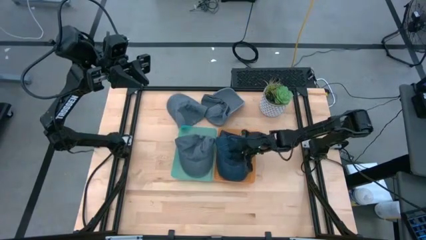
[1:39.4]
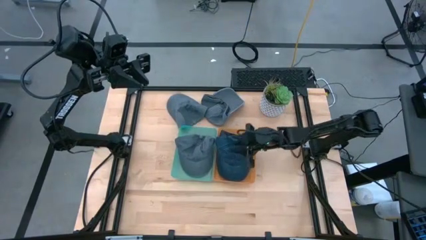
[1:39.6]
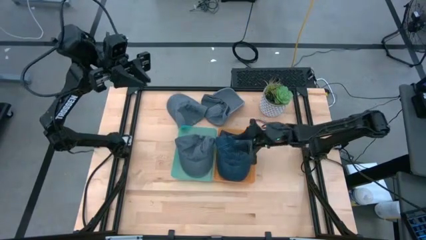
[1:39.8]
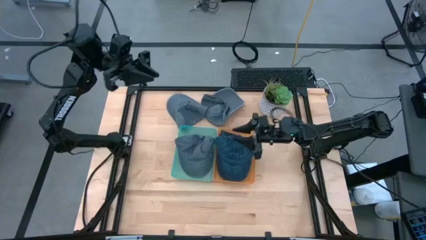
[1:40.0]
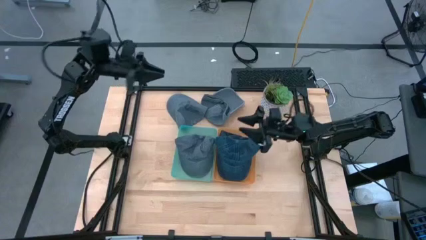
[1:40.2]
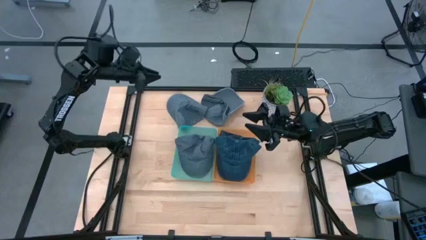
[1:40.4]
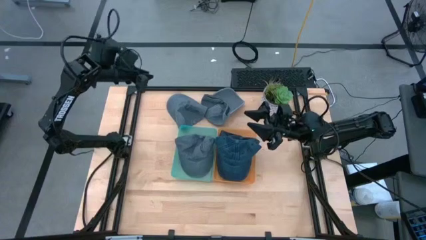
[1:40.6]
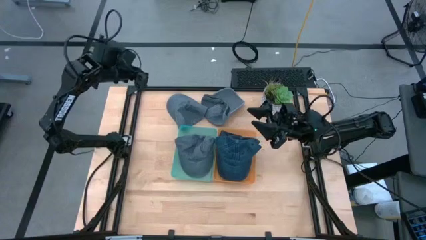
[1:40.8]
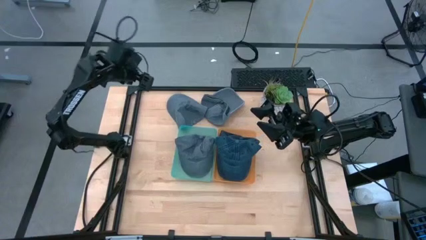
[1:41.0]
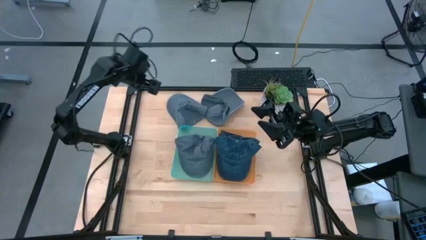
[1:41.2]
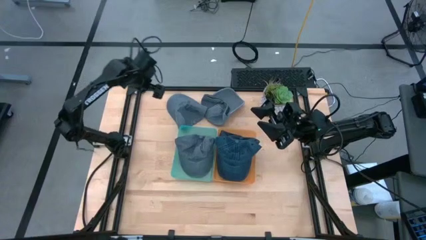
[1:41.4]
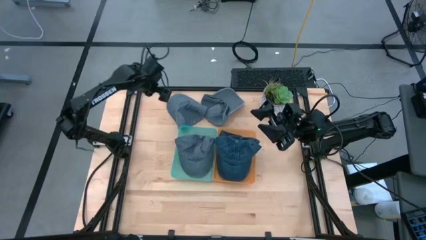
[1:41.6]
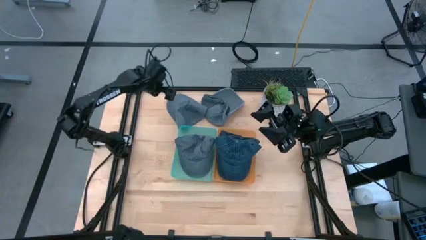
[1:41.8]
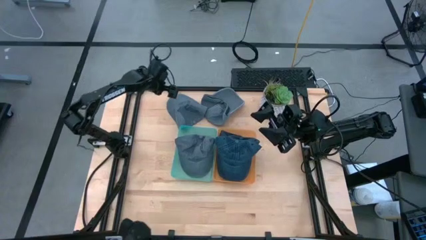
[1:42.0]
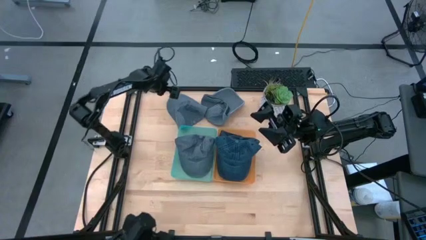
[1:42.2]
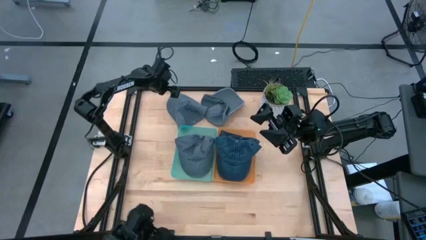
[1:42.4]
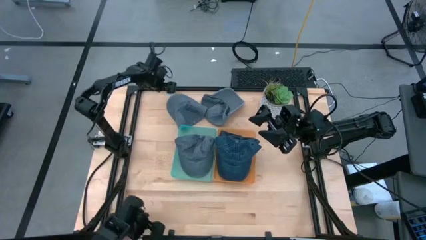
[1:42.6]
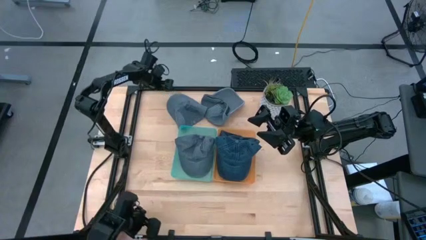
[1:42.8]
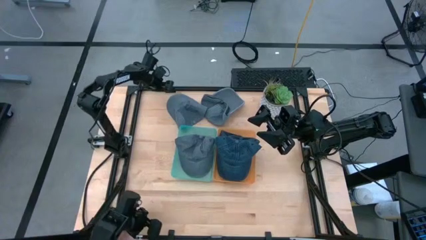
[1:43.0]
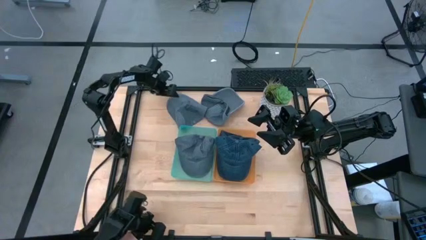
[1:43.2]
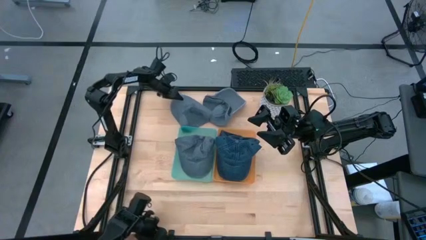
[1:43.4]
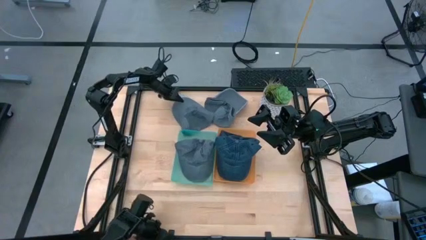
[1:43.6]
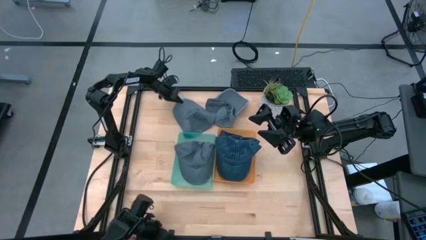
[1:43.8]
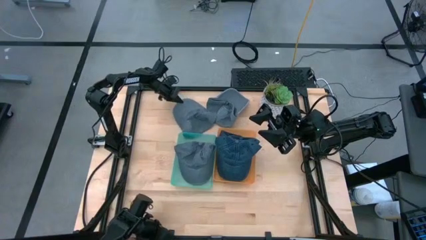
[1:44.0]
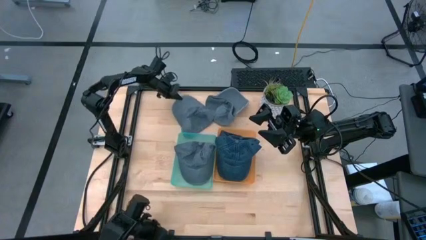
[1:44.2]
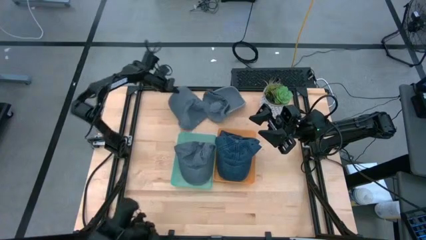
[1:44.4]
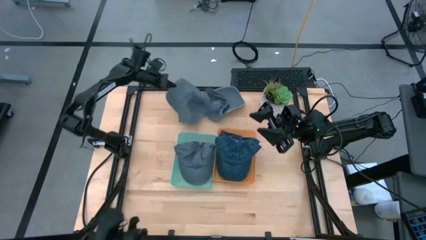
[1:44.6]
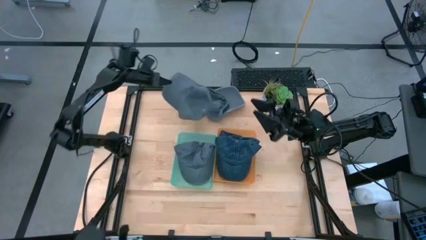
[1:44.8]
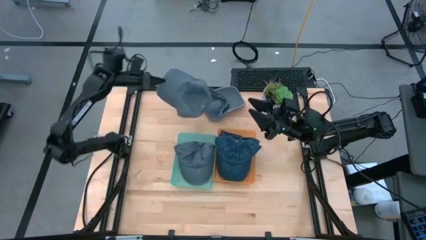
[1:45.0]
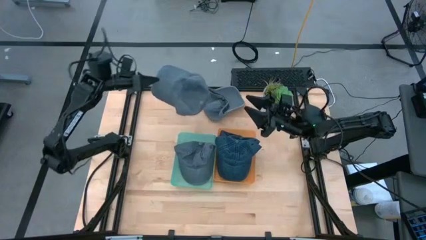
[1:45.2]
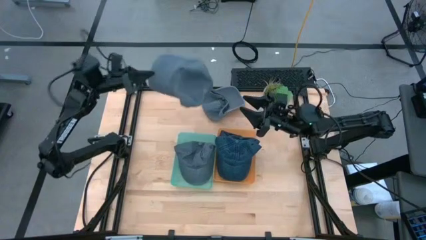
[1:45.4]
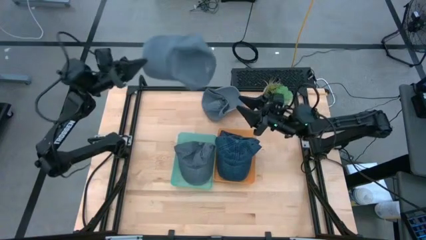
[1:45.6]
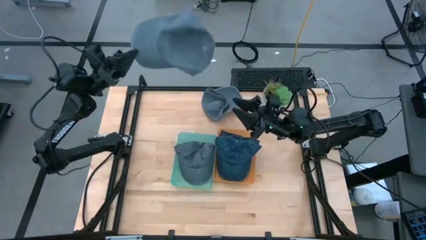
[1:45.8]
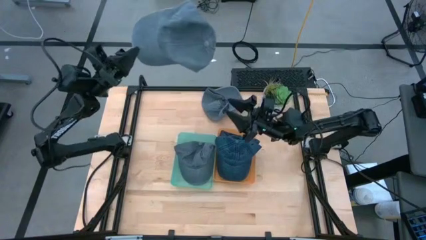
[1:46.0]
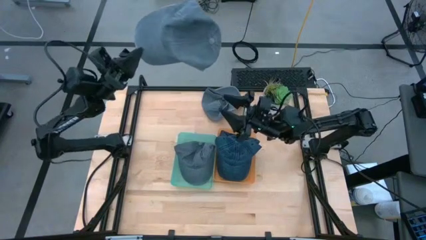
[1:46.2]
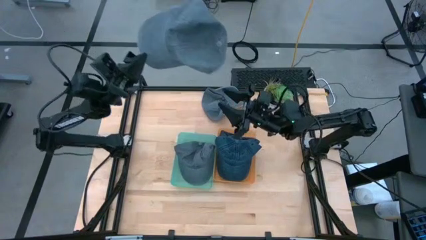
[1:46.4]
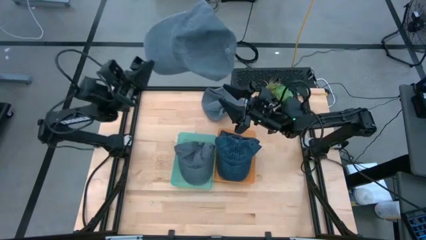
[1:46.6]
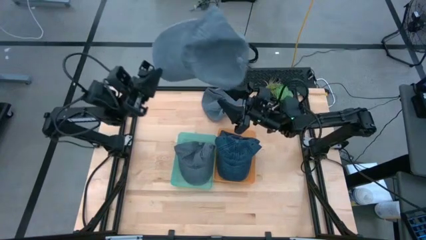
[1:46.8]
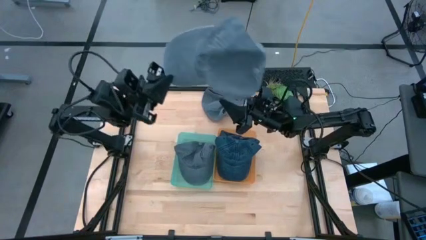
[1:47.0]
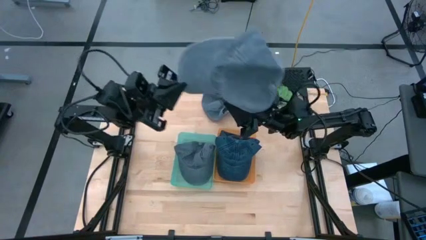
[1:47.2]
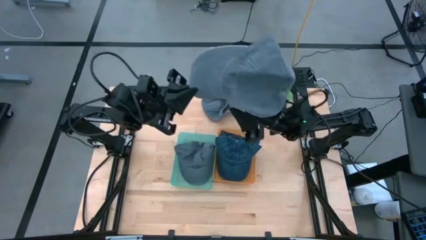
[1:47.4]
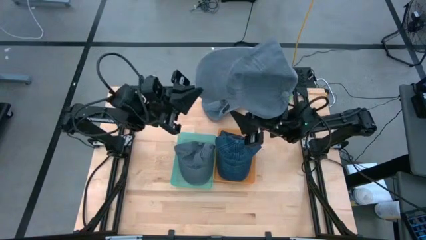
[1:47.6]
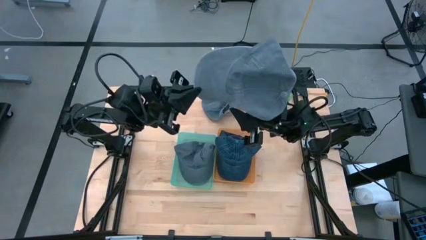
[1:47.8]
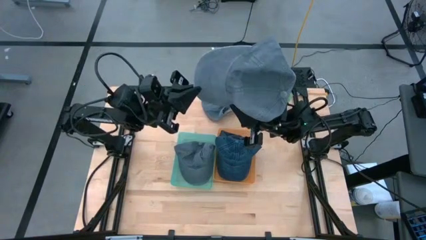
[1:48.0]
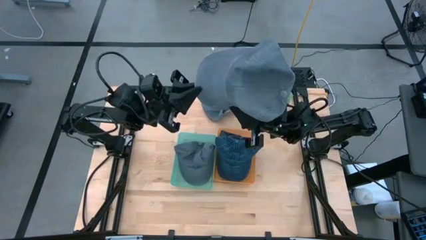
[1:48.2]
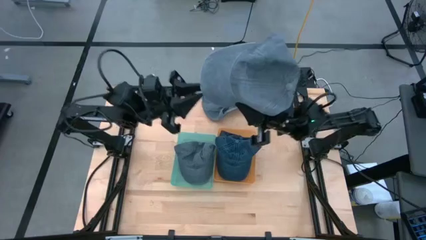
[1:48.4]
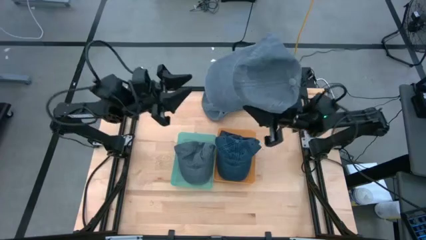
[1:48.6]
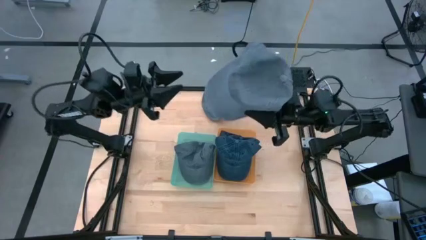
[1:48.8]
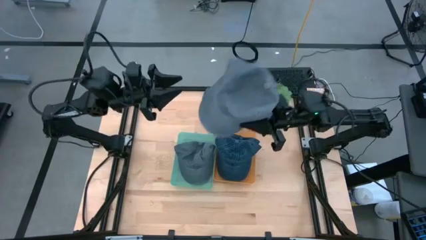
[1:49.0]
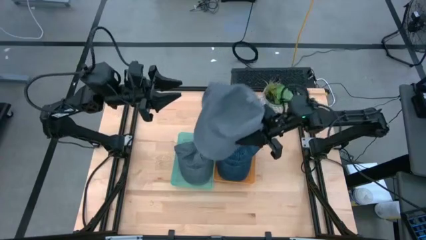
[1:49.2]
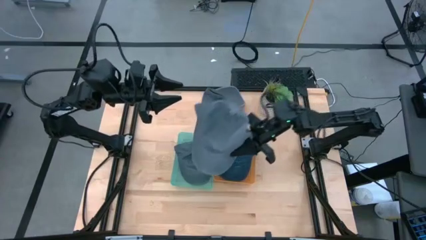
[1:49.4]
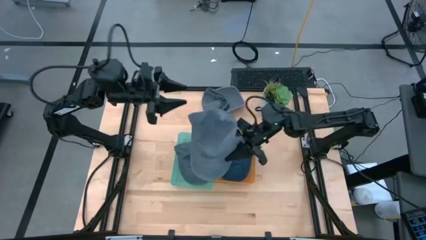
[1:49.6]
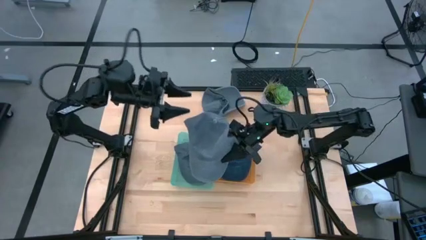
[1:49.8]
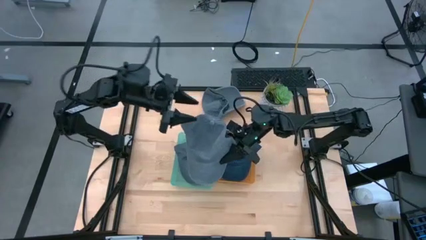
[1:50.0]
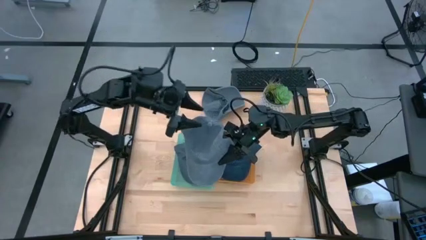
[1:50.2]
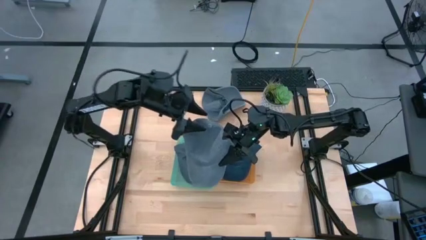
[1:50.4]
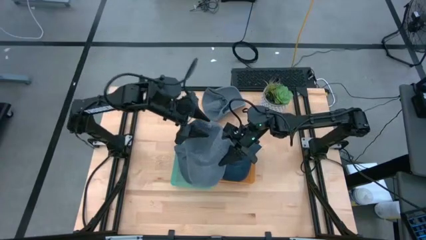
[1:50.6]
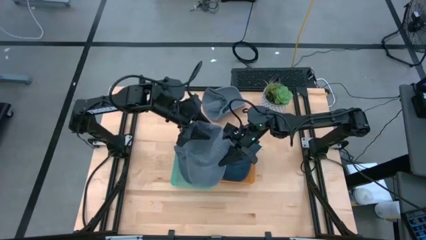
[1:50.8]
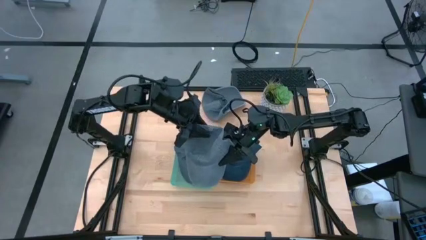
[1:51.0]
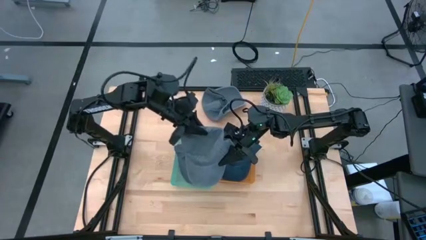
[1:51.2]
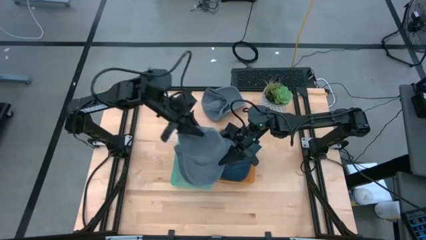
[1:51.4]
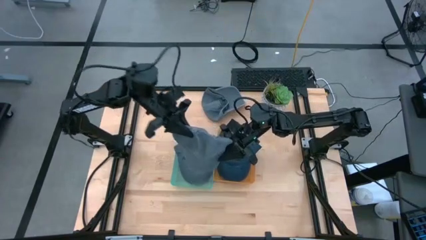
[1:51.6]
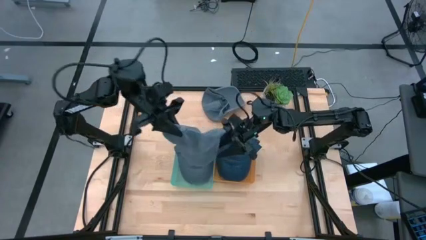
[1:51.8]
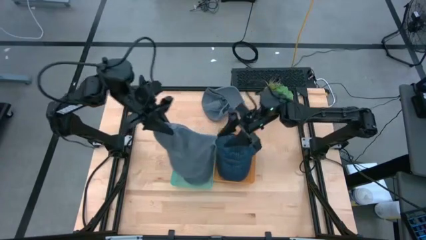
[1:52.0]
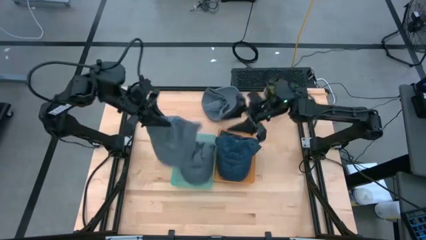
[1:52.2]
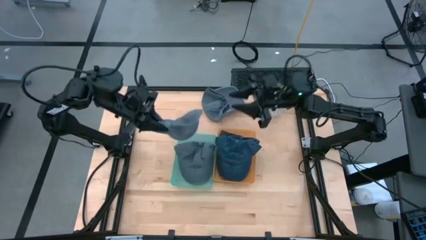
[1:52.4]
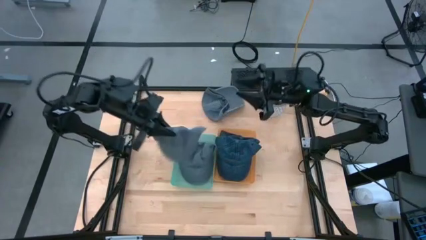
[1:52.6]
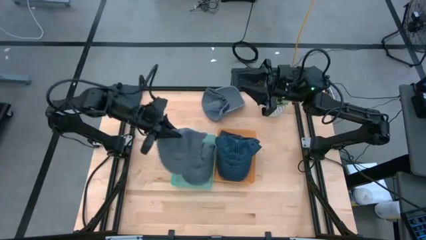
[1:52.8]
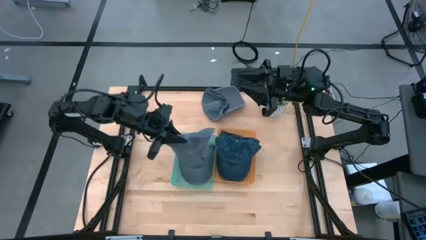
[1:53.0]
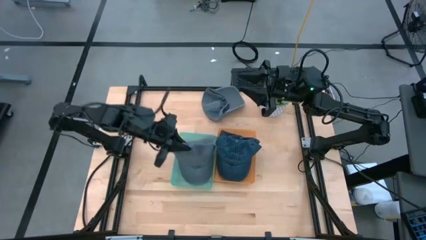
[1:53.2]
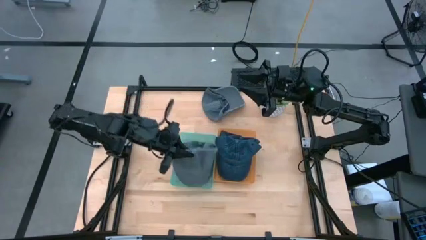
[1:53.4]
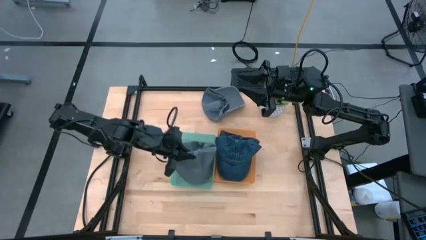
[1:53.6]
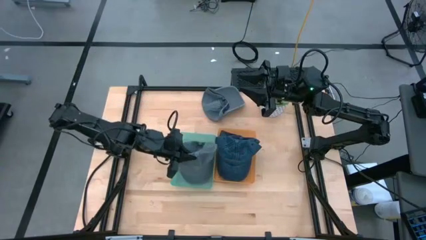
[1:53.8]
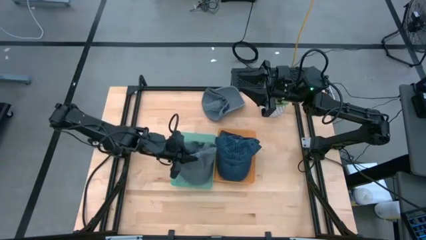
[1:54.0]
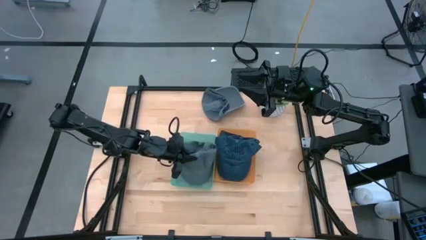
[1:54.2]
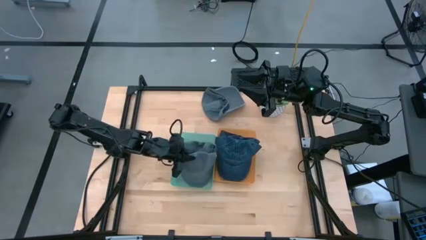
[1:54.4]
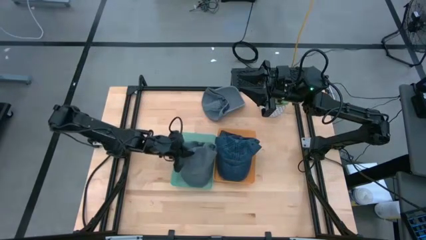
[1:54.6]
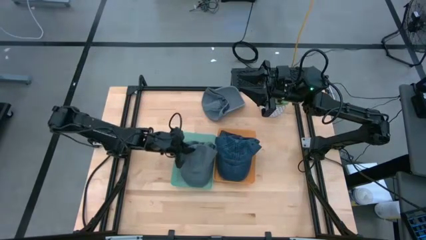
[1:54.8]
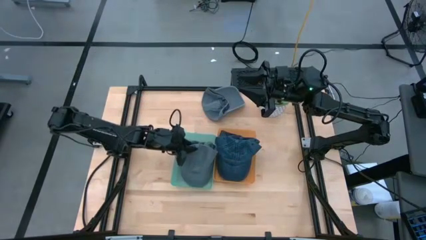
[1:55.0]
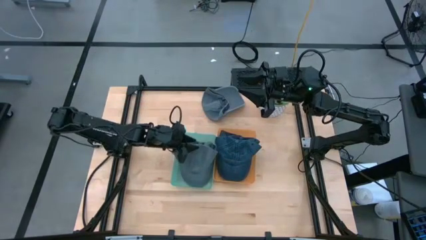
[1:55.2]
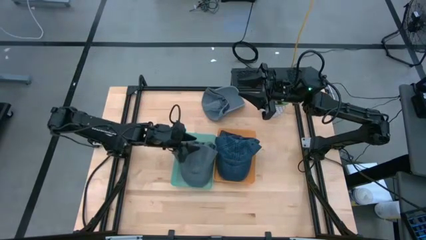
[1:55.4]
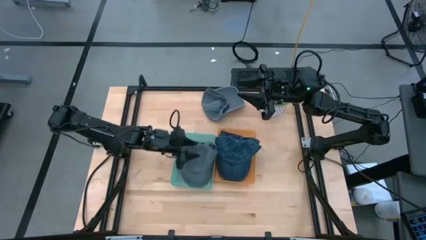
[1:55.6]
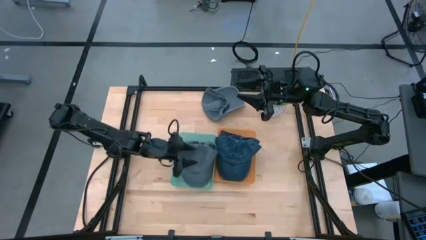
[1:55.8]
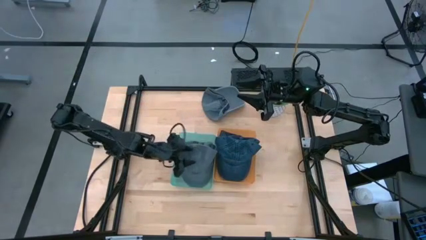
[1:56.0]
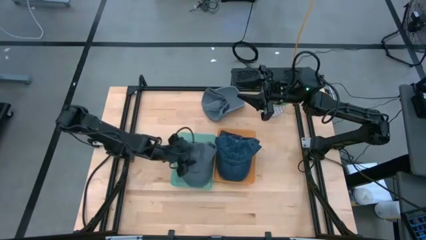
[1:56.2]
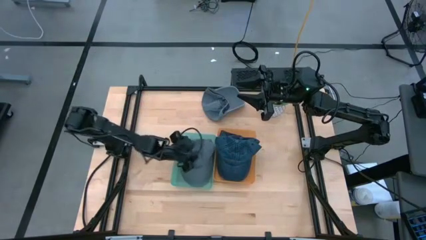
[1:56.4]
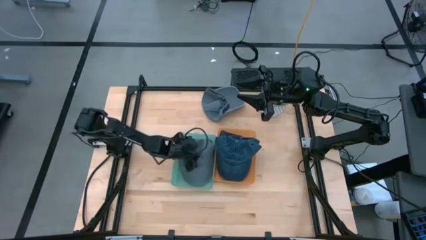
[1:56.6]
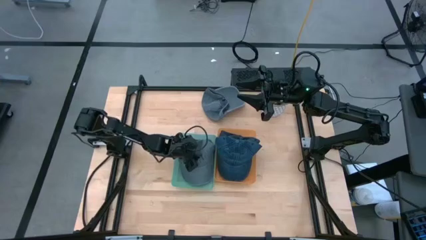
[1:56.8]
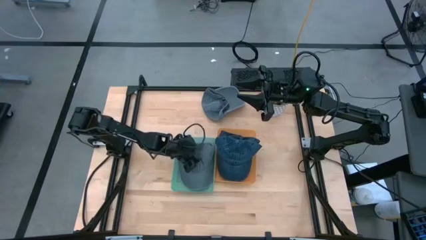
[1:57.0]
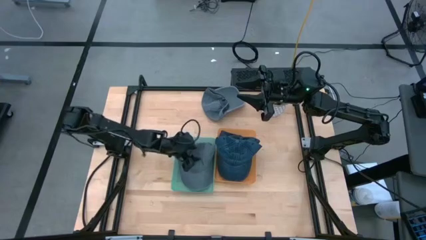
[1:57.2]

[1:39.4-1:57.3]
Task: Pick & Place hat
Put the left gray cap into the blue bin
